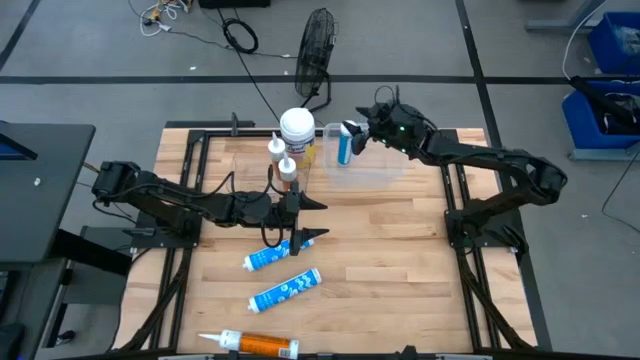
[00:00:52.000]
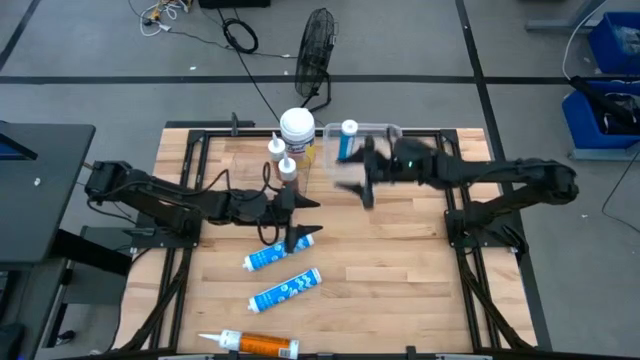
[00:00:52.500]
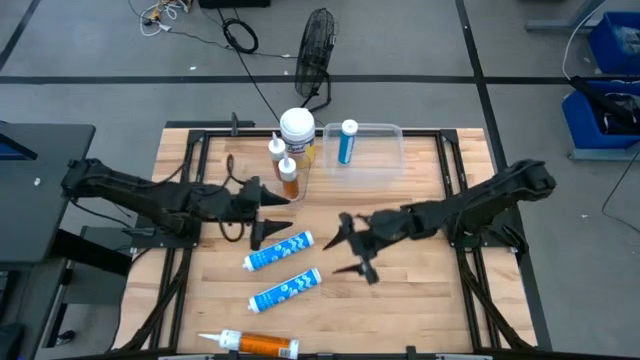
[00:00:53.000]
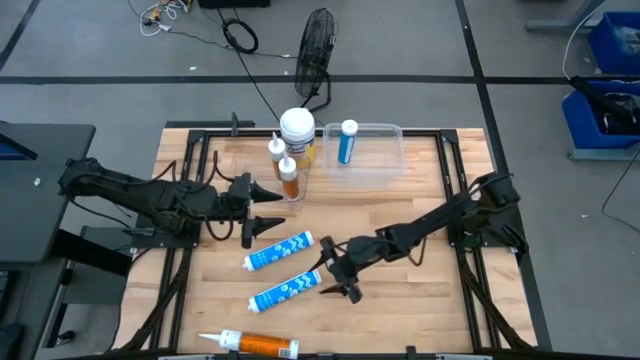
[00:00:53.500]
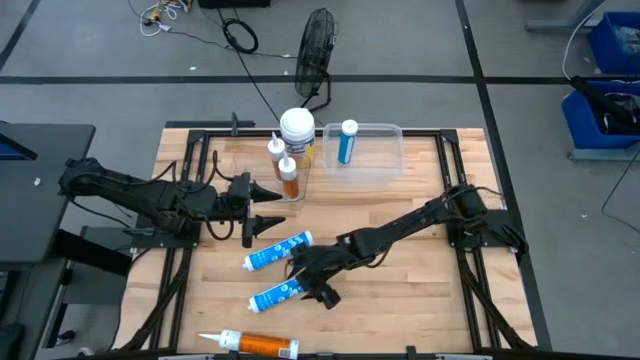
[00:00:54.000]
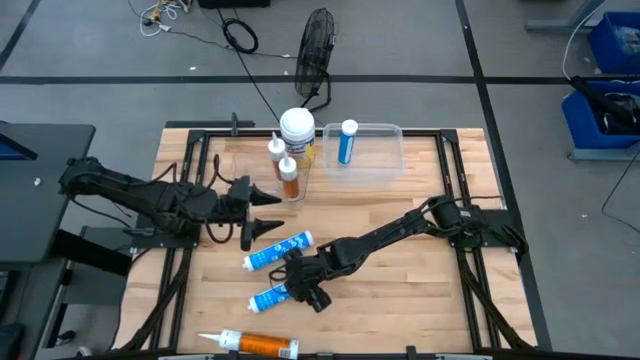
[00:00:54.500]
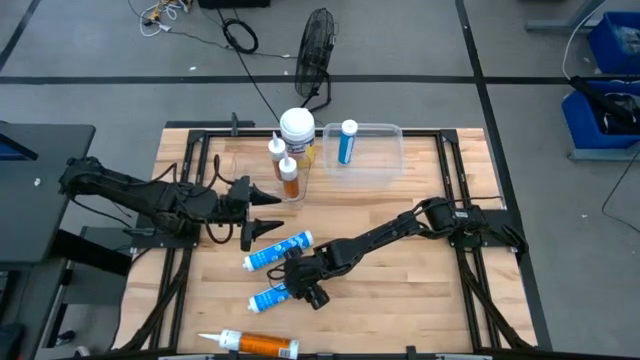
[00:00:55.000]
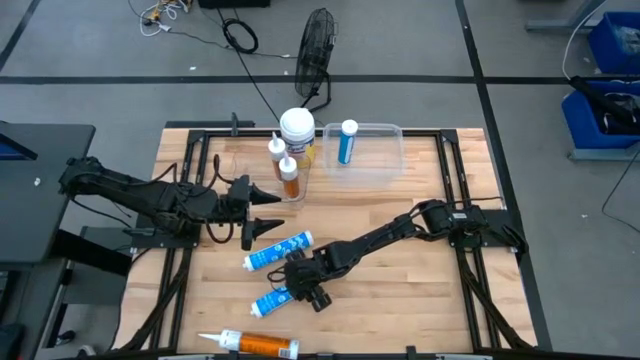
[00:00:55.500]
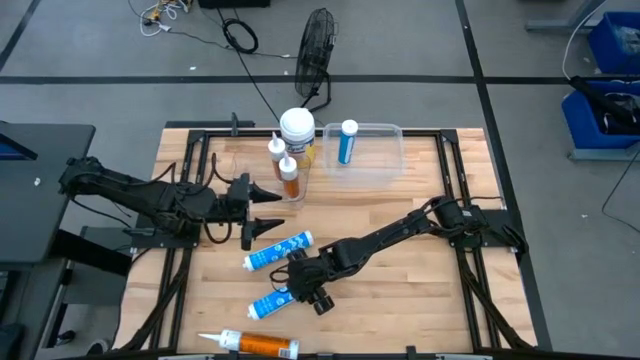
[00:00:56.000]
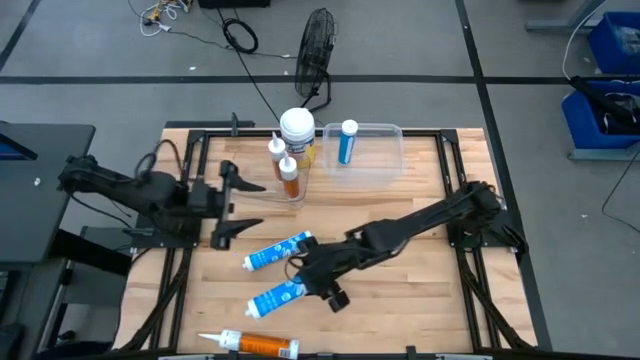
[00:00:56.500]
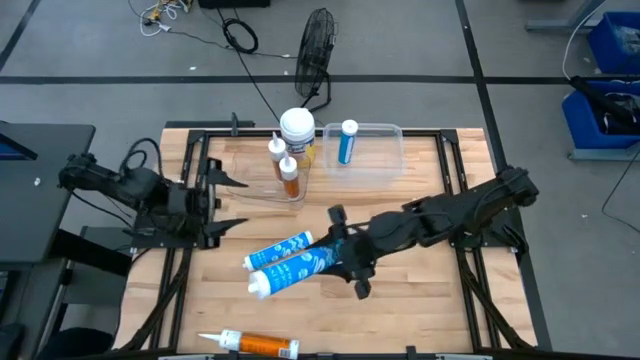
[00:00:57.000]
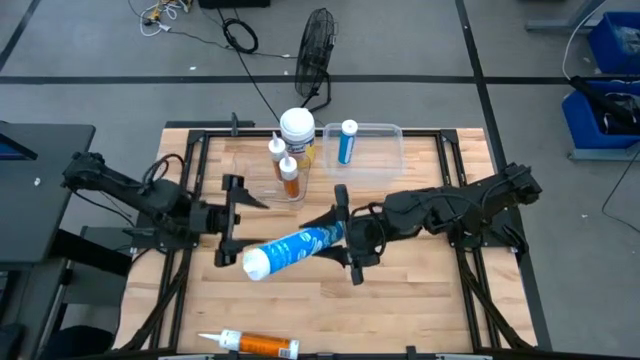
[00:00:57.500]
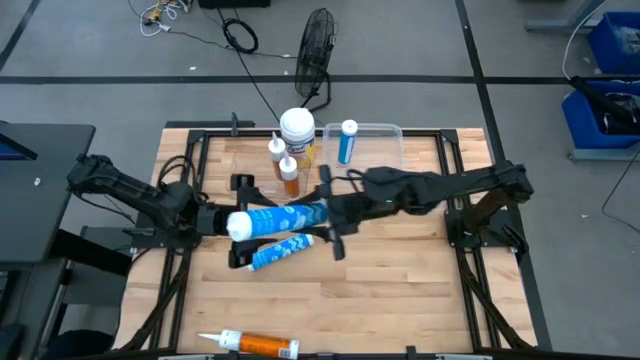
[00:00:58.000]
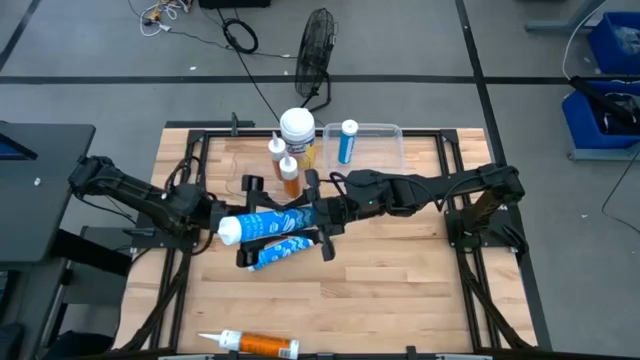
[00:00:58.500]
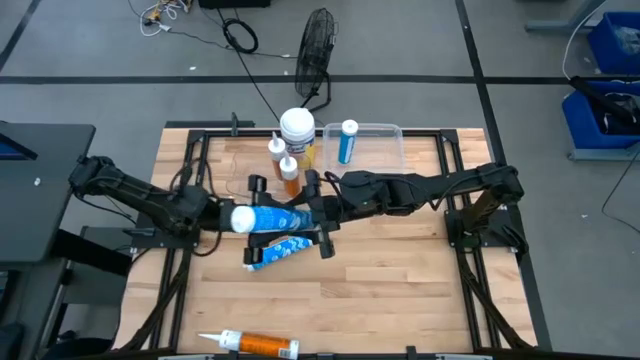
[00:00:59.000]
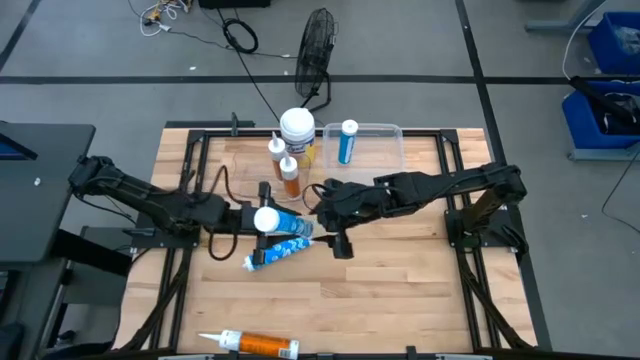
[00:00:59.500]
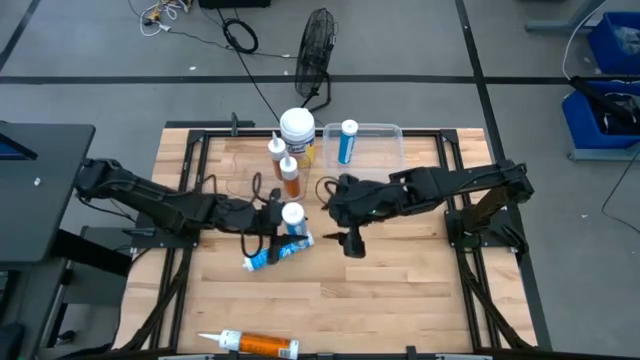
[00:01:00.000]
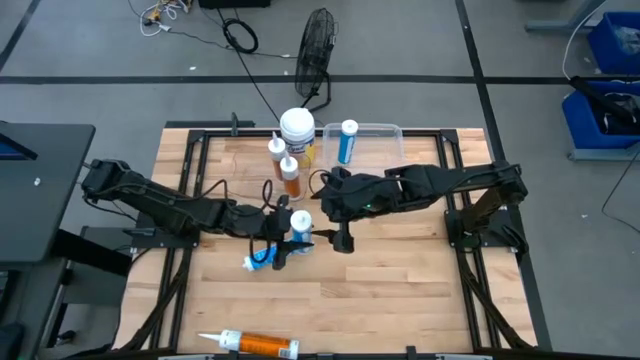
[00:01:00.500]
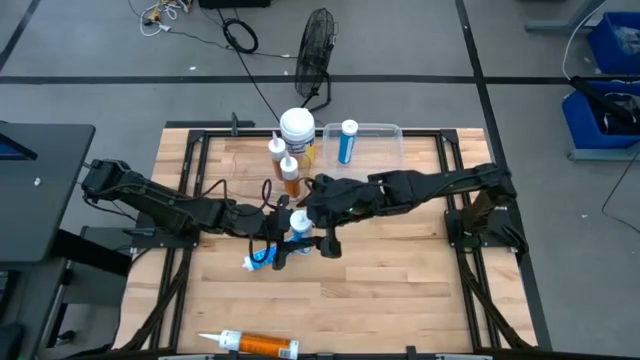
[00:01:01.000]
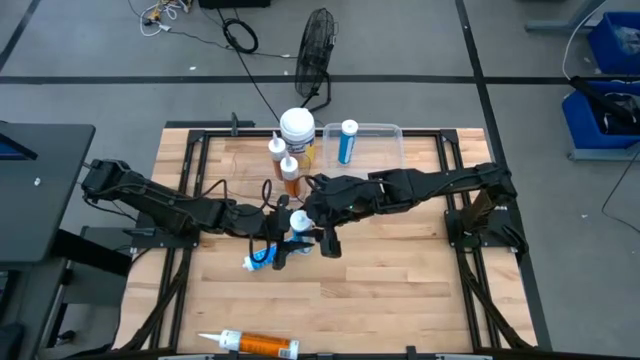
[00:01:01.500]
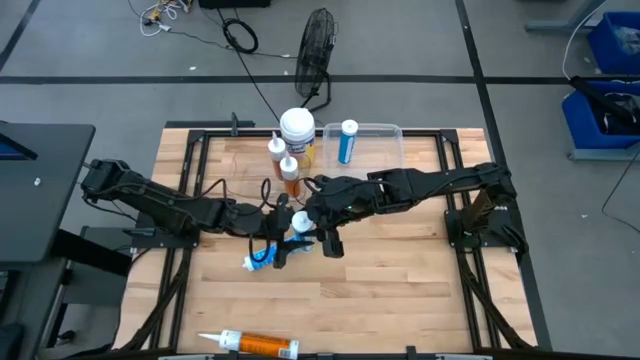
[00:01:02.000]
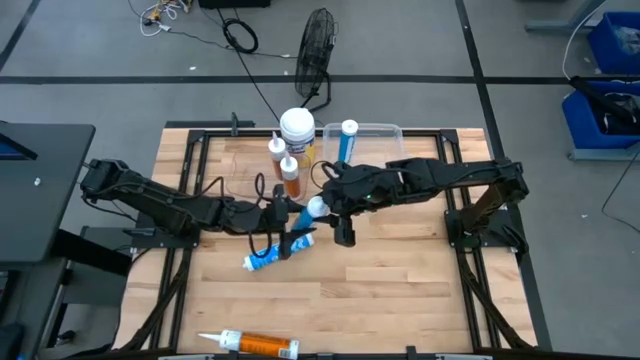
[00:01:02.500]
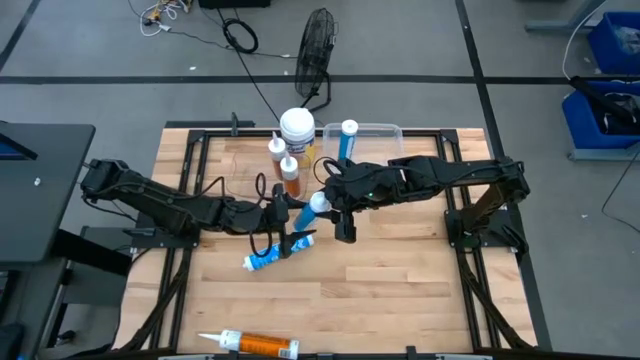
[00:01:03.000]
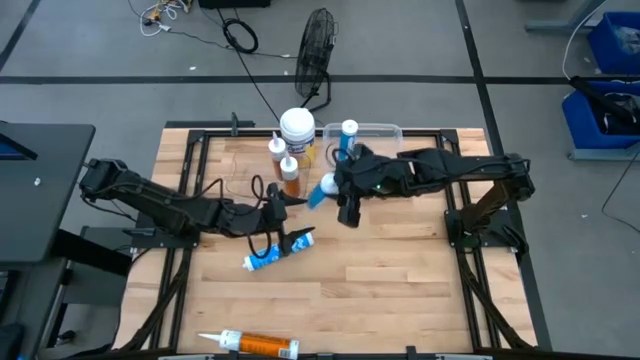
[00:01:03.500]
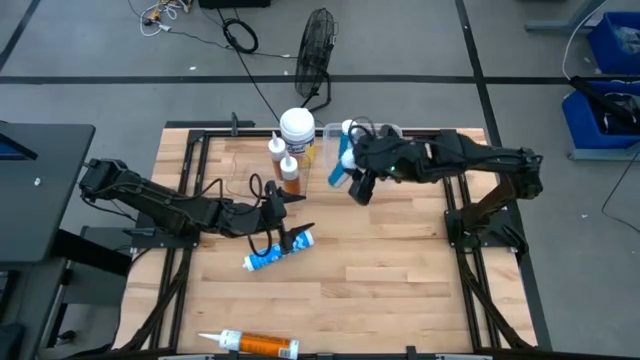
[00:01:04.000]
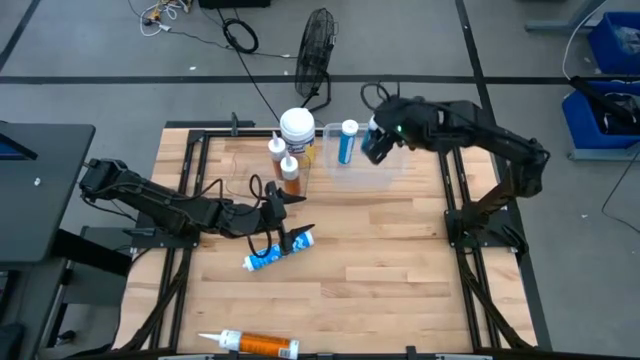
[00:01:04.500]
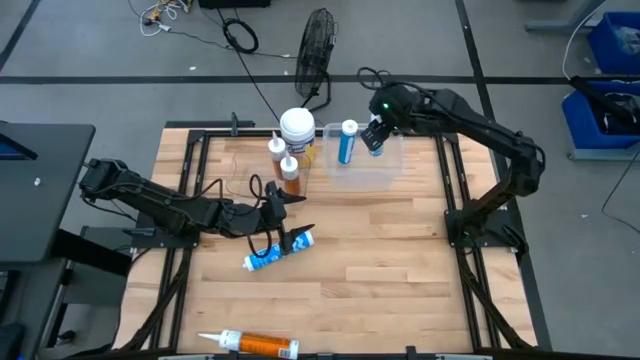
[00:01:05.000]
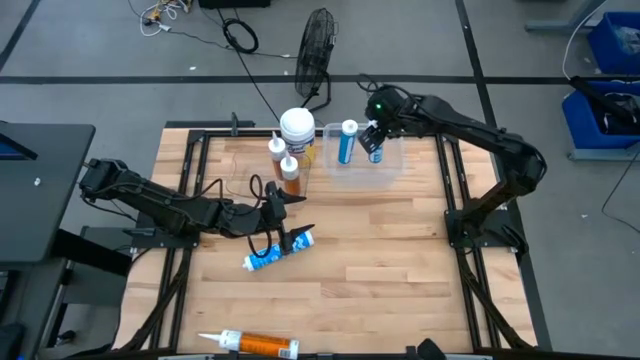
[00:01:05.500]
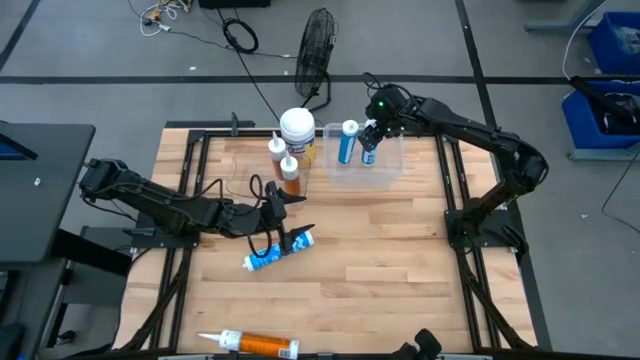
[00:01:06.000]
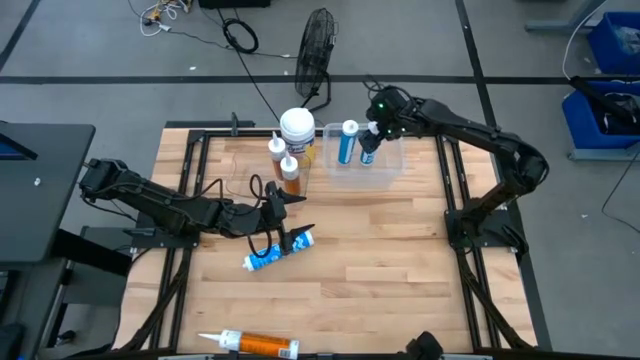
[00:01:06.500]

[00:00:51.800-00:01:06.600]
Task: Pick & place silicon tubes, Sealant and Lysol wipes
Put the bottom blue sealant into the right transparent bin

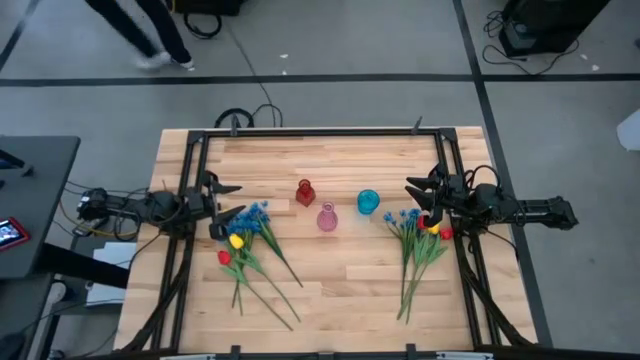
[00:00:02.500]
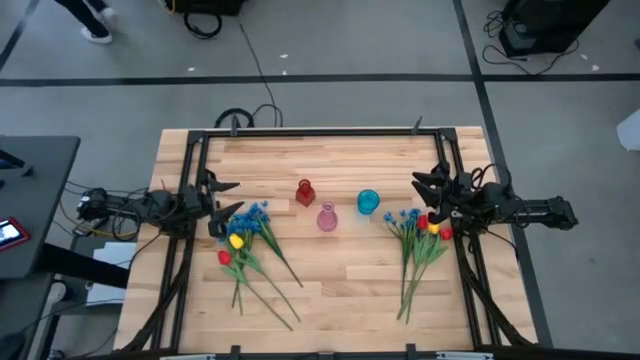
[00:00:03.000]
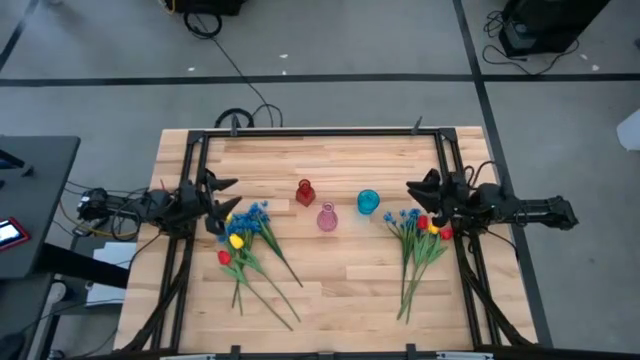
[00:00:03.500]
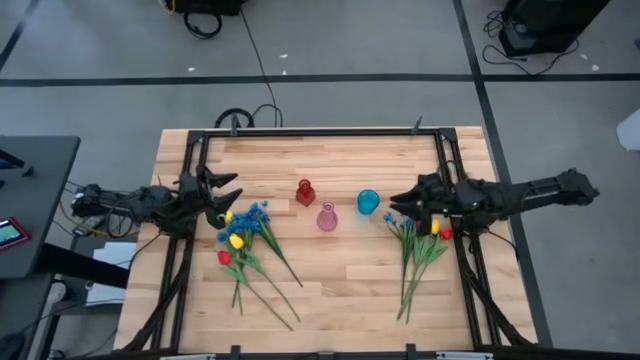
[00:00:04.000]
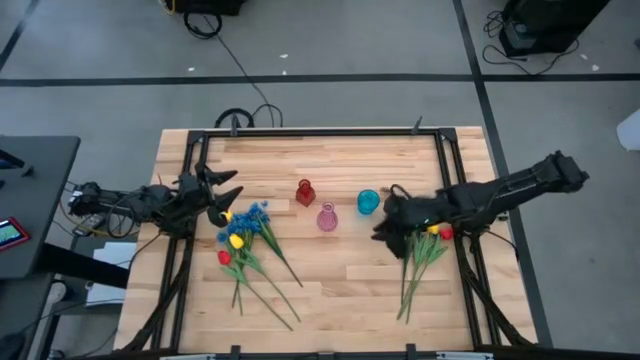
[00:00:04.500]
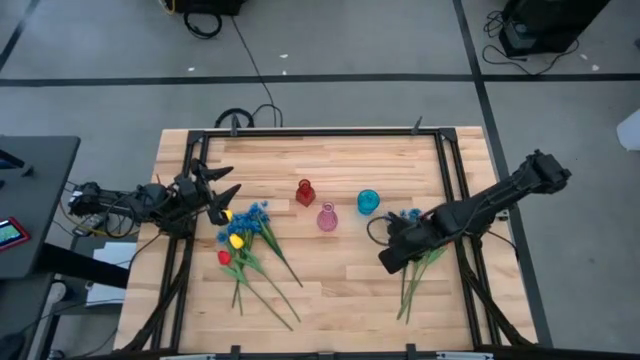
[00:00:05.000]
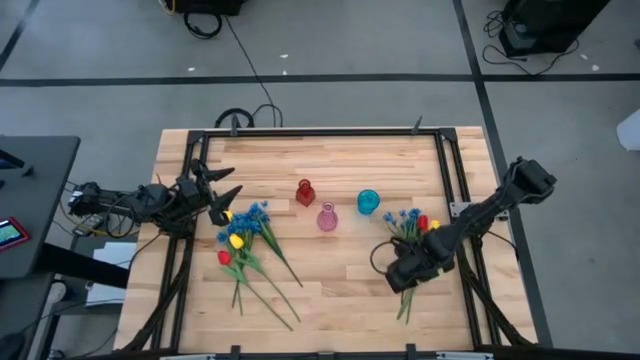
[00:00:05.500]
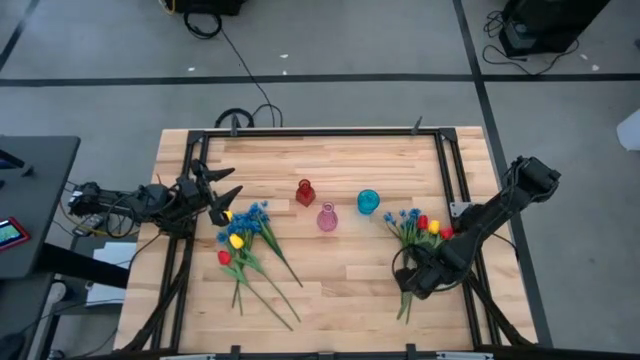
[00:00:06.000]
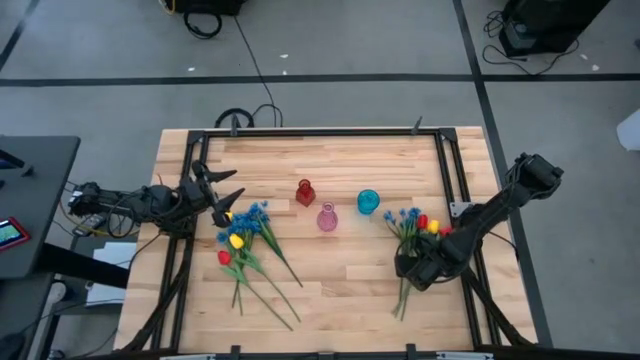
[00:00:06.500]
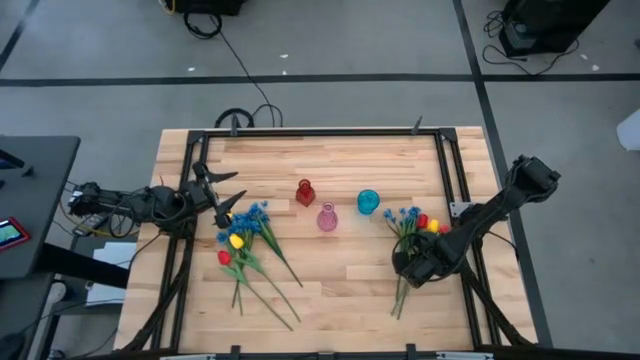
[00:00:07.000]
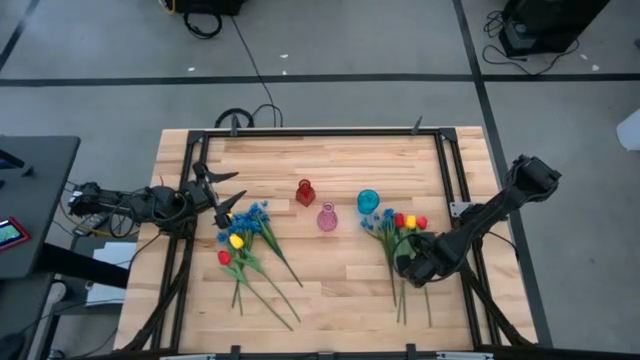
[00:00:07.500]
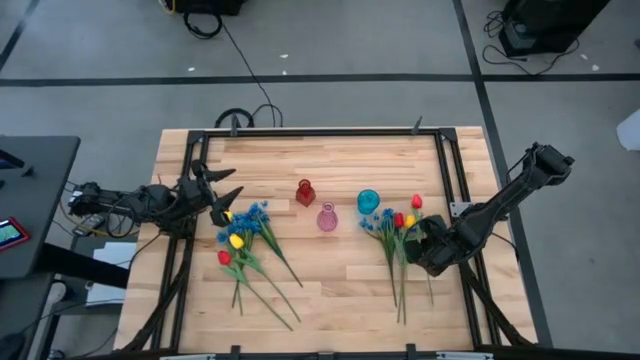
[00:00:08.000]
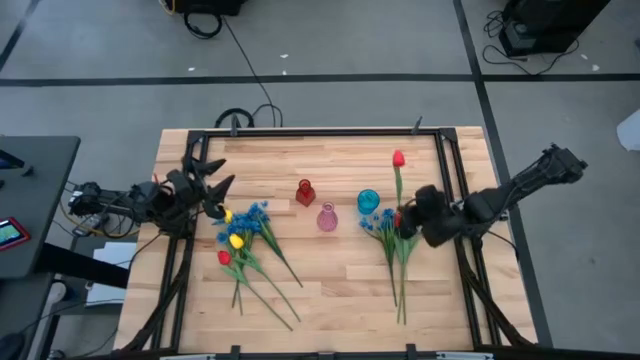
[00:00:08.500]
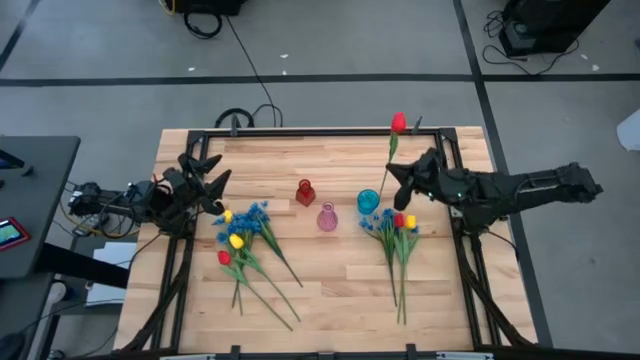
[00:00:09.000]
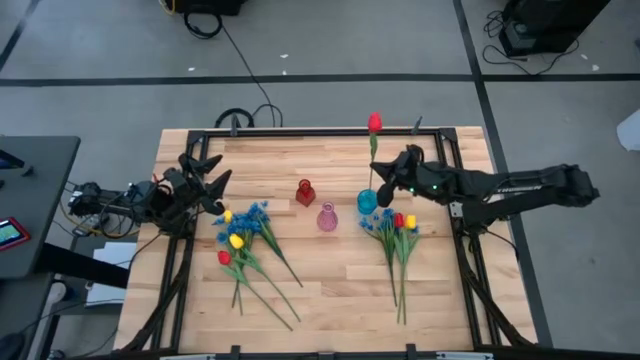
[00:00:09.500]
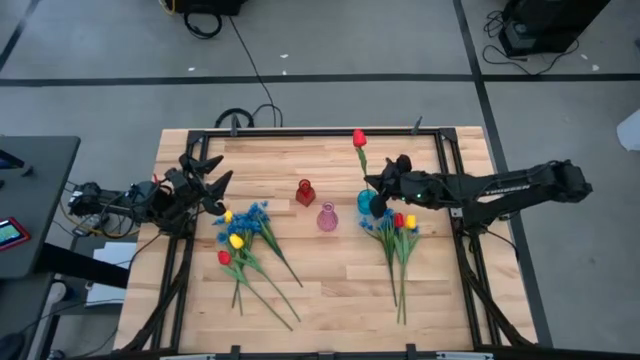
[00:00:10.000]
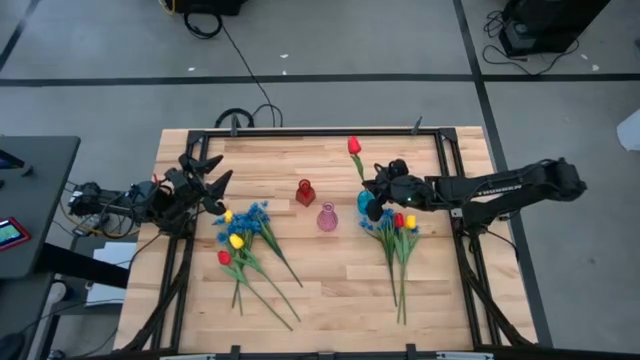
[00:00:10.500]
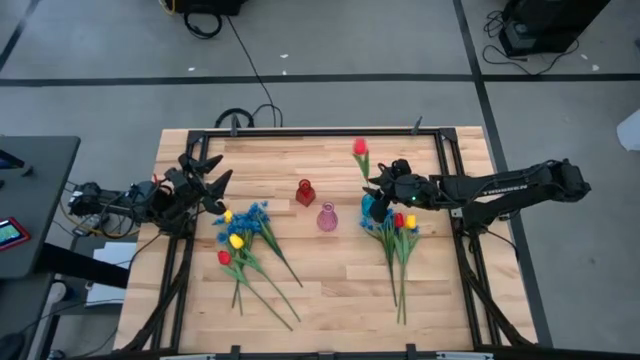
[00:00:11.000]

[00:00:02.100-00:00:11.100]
Task: Sort flowers into vase by color
Put the red tulip into the blue transparent vase
